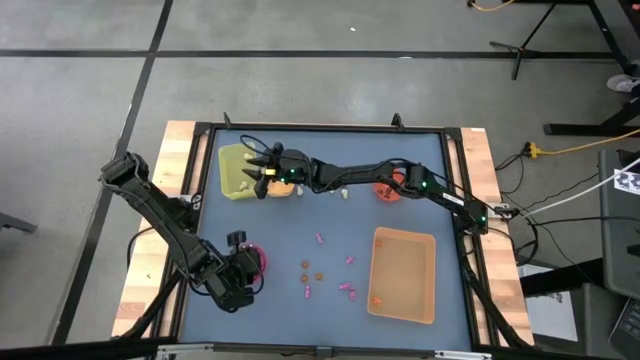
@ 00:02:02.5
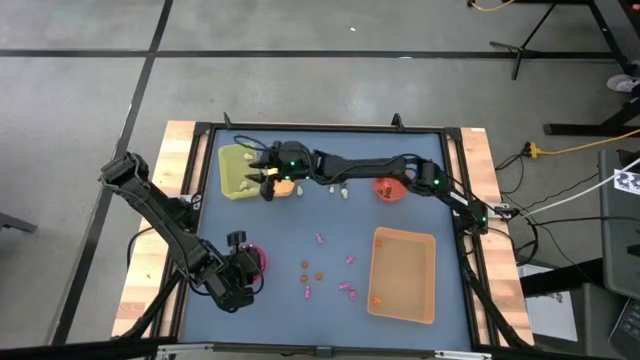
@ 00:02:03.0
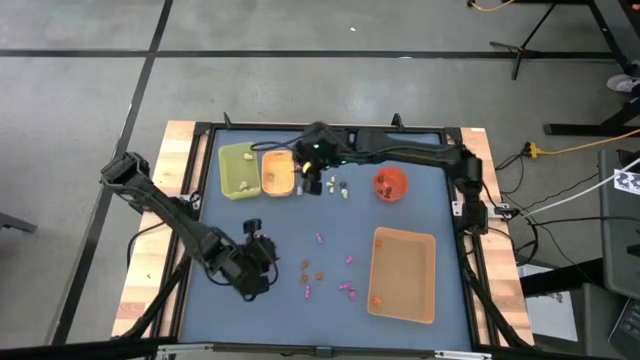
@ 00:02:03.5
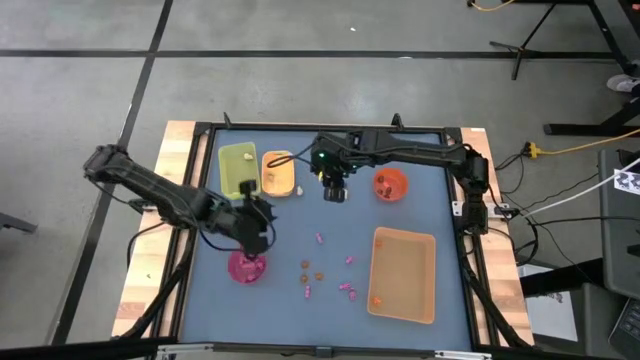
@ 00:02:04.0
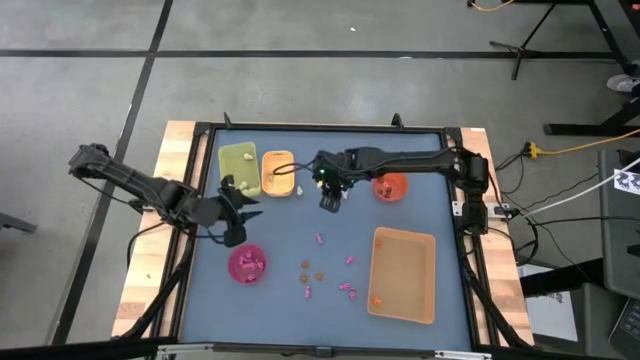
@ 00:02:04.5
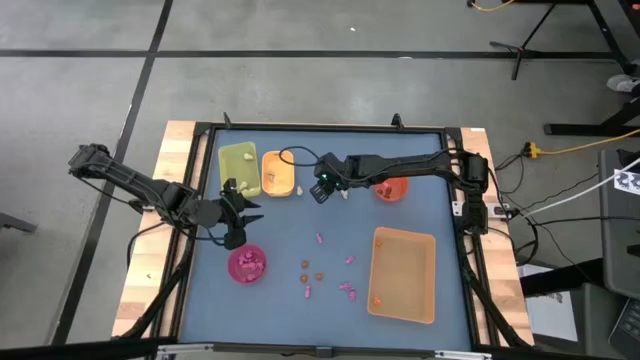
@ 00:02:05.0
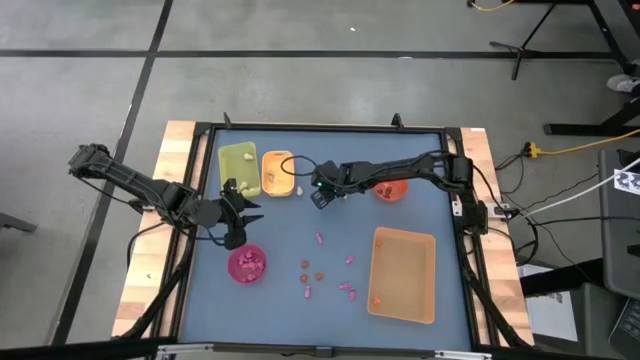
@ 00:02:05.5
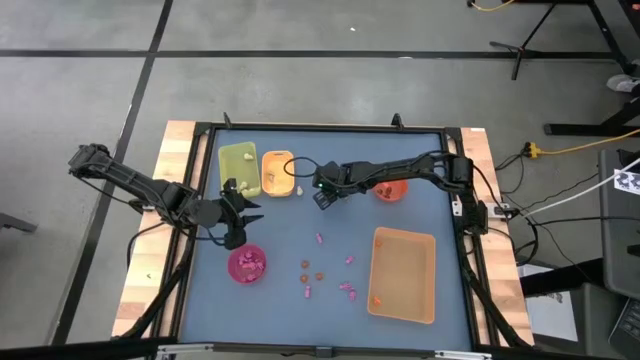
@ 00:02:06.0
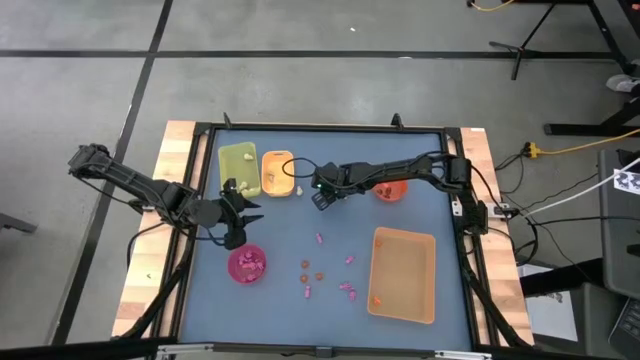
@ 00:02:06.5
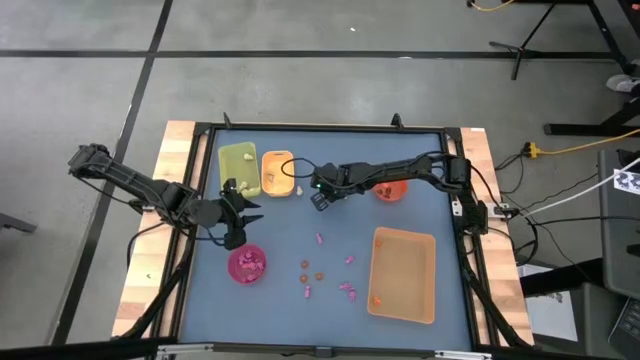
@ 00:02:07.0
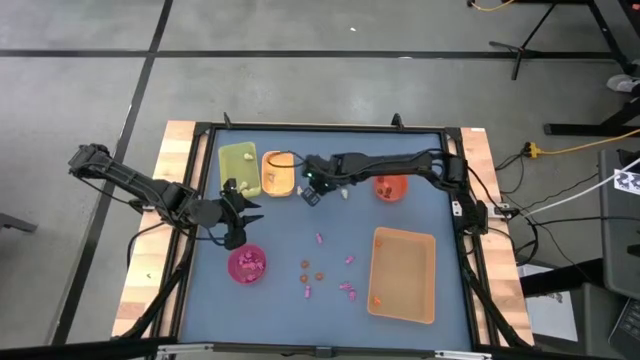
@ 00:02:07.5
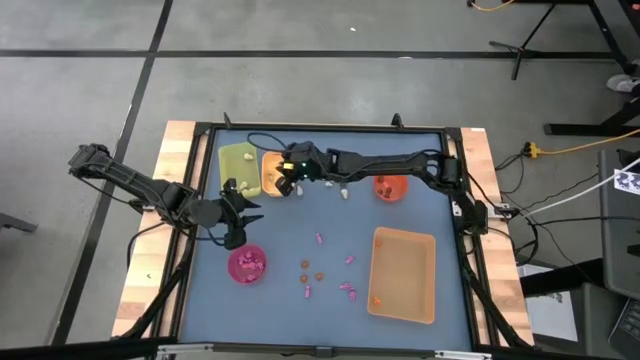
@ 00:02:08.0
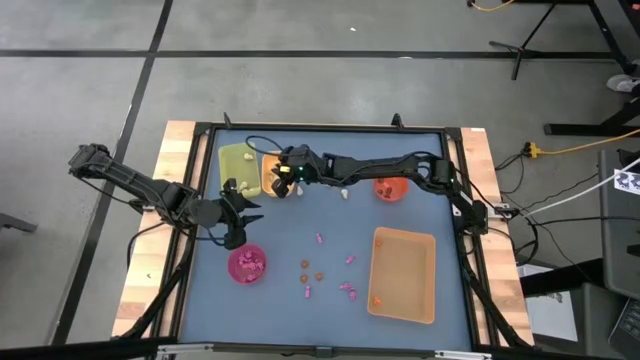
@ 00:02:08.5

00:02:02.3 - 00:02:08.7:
Task: Sort Halloween decoration
Put the small white skull toy into the yellow bin

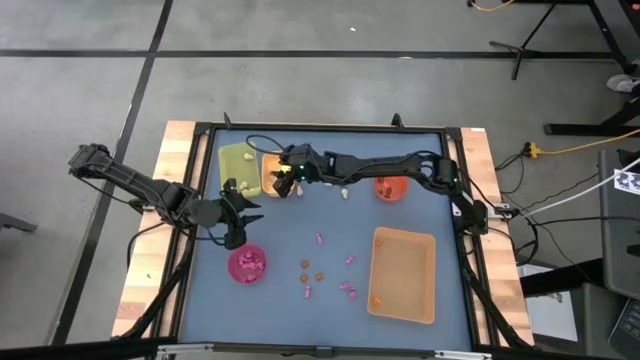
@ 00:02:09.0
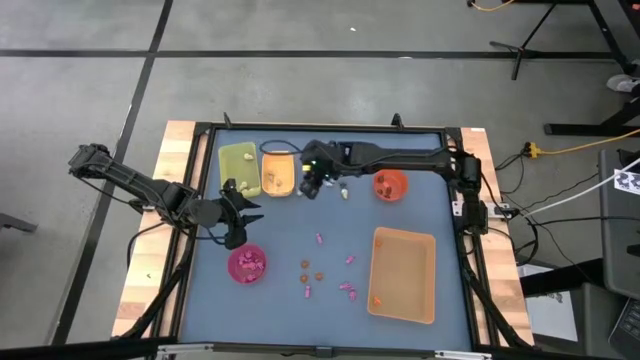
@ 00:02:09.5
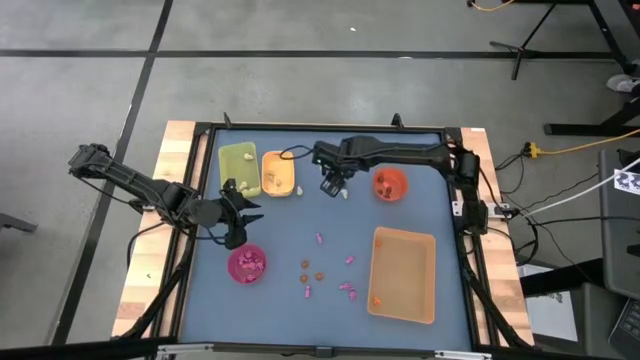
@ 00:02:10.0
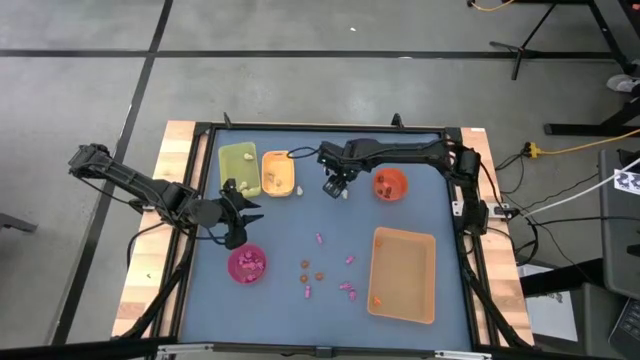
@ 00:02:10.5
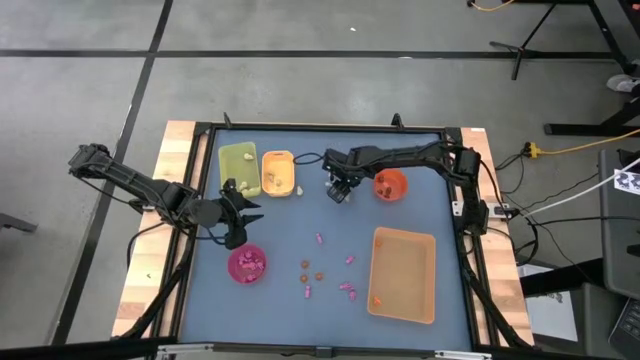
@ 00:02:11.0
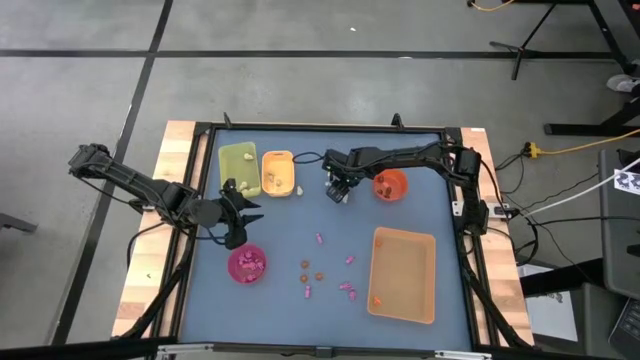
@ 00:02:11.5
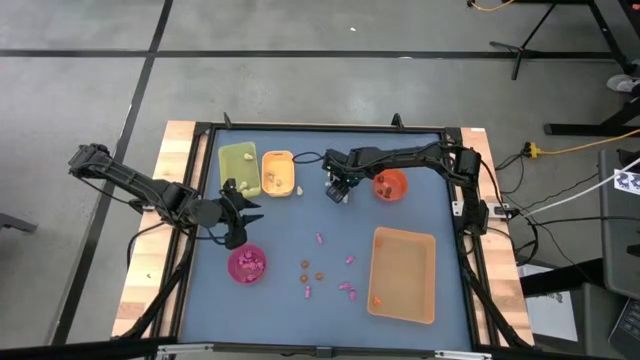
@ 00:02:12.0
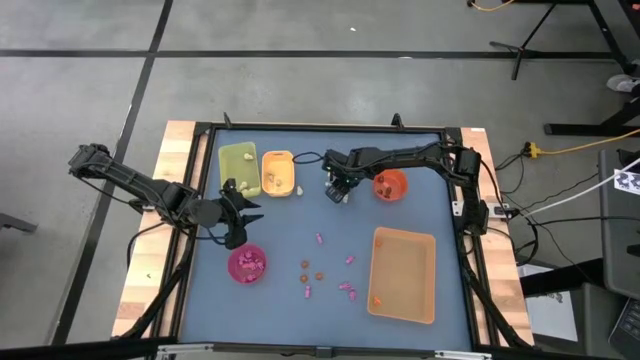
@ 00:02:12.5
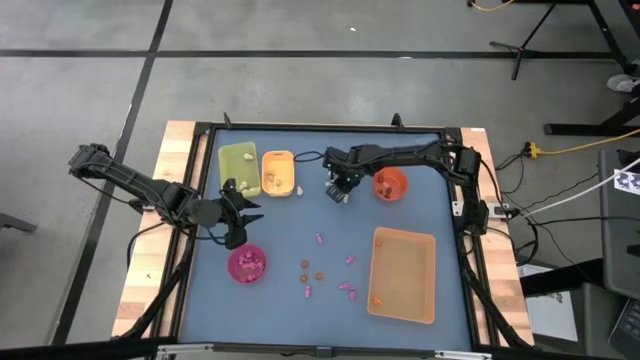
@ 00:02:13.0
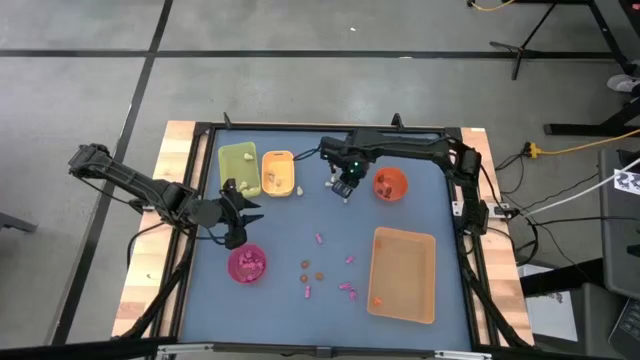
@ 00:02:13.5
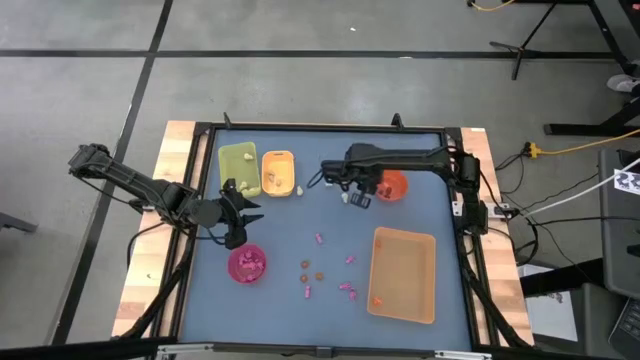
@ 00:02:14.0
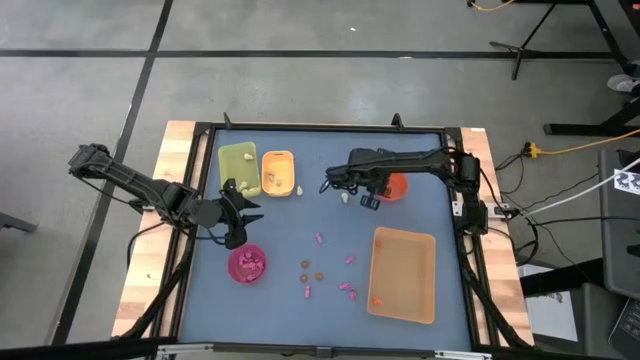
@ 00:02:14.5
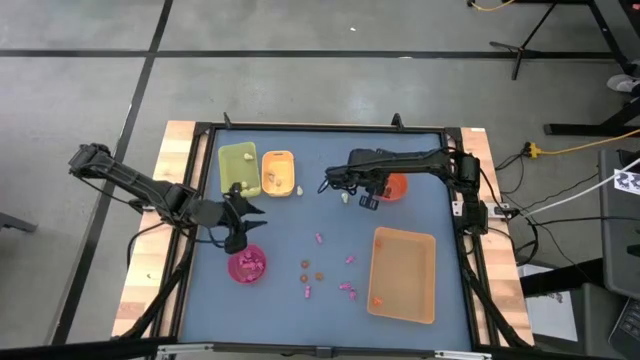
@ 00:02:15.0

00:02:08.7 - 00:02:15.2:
Put the black skull toy into the orange bowl

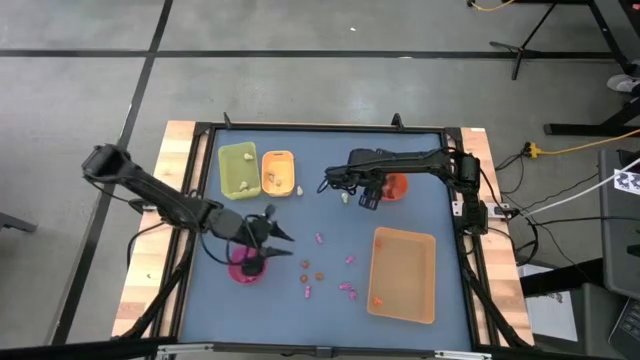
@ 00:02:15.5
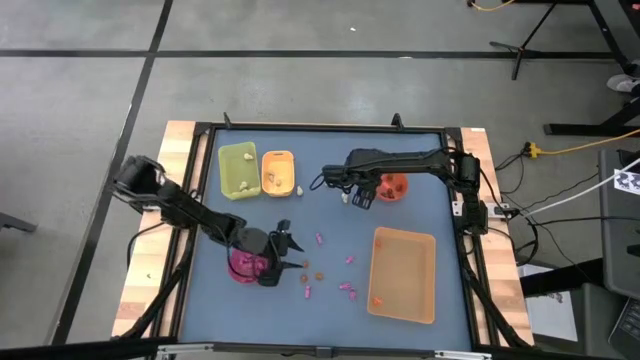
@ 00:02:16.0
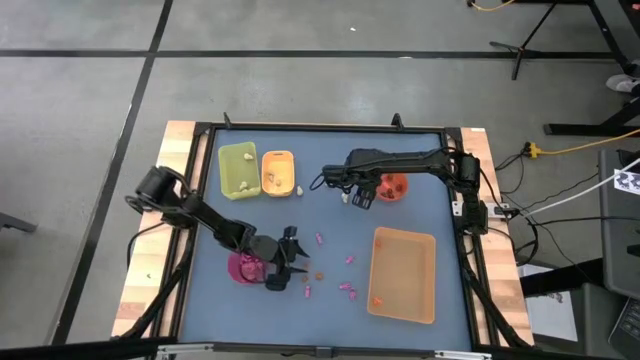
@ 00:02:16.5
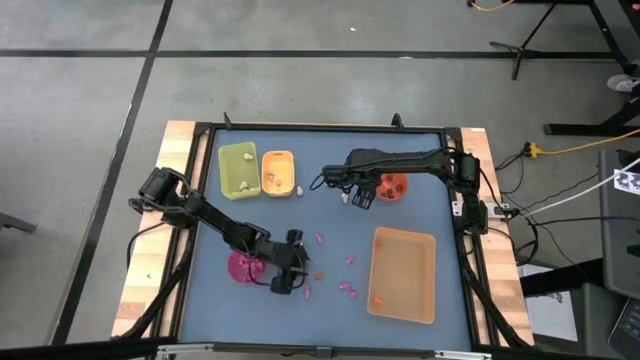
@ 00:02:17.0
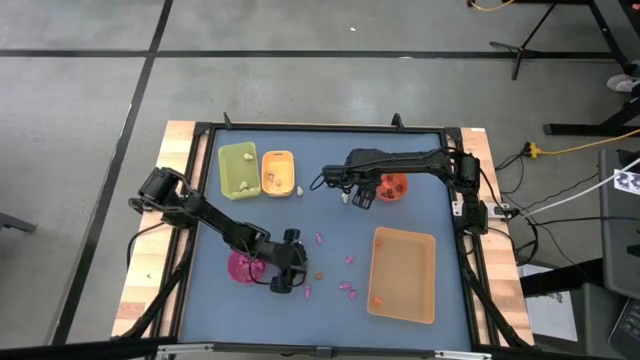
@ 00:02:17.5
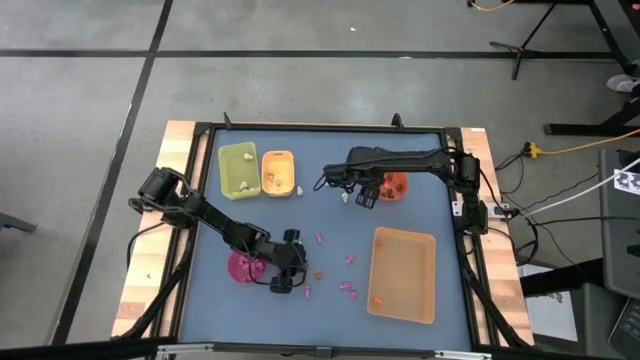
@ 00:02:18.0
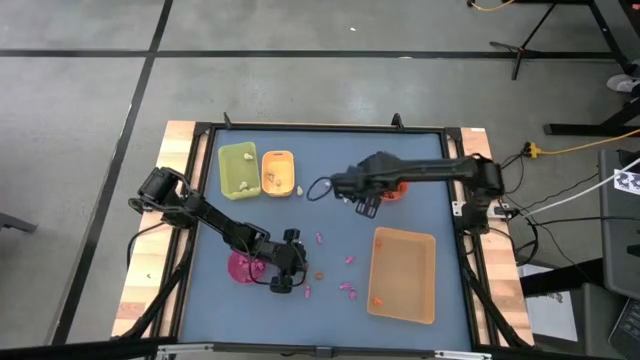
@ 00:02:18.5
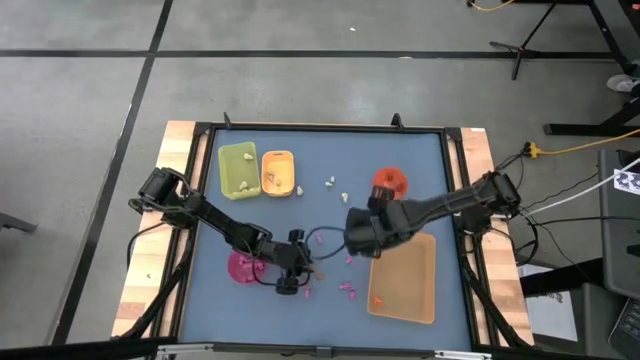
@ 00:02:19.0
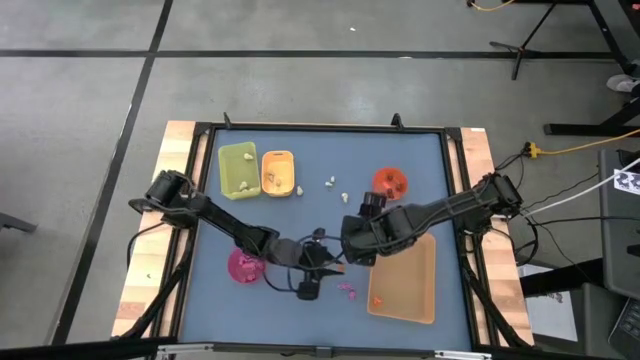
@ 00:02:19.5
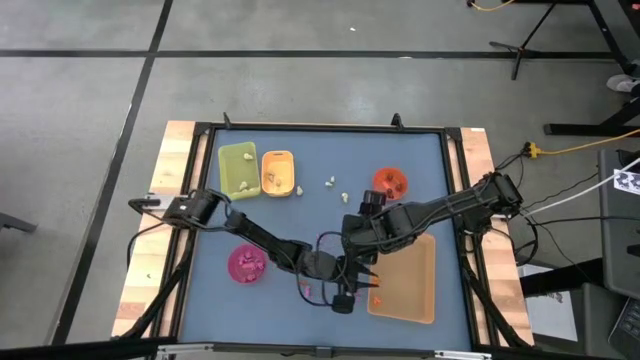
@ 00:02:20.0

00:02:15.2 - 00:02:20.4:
Put the orange pumpkin toy into the orange bin

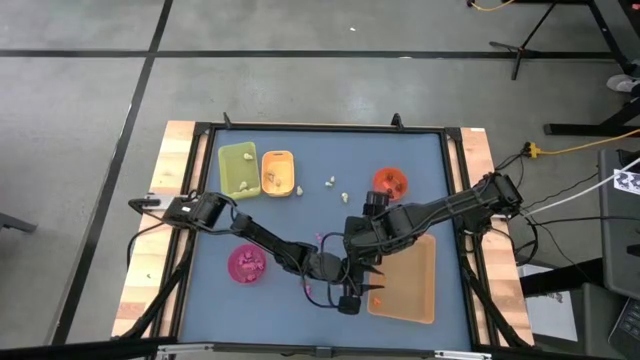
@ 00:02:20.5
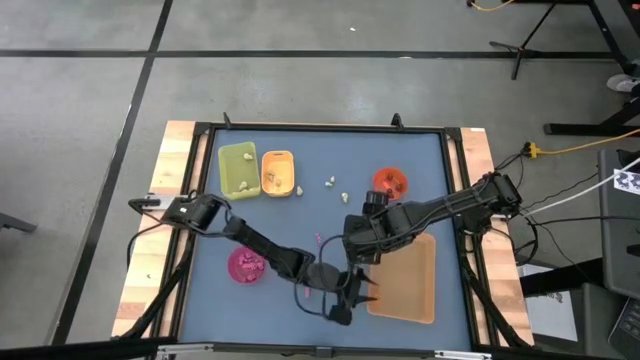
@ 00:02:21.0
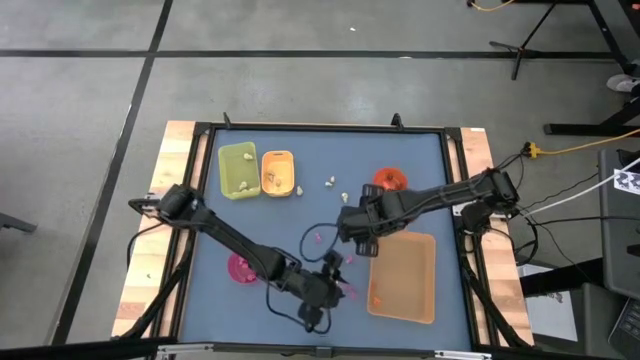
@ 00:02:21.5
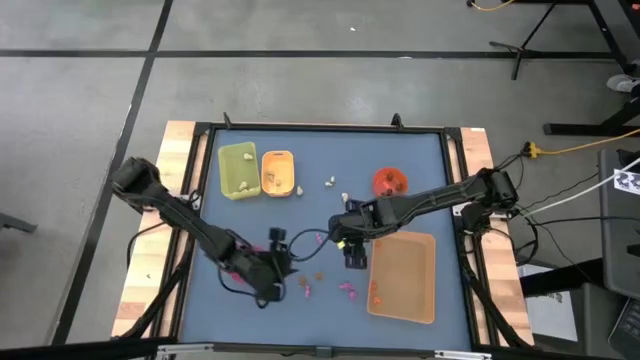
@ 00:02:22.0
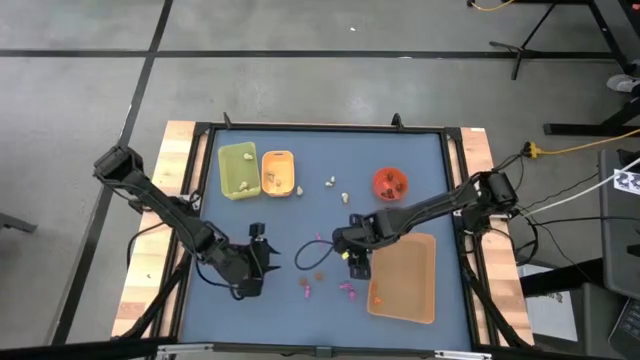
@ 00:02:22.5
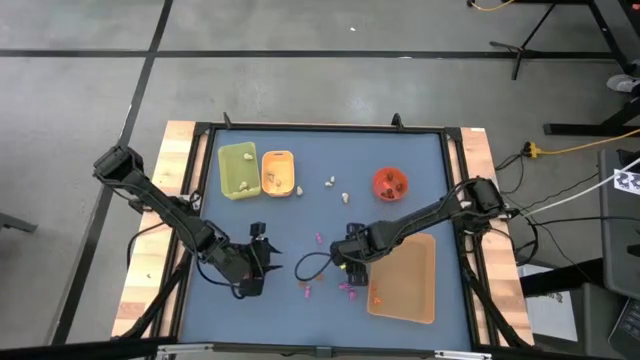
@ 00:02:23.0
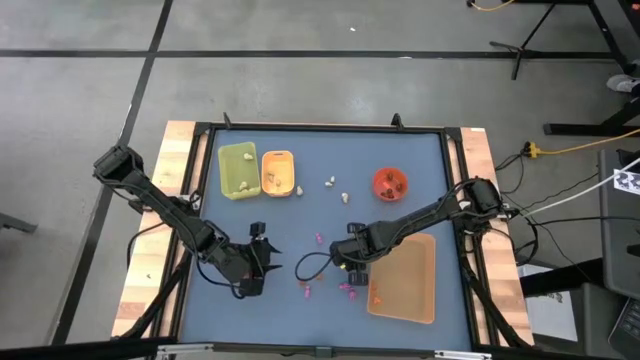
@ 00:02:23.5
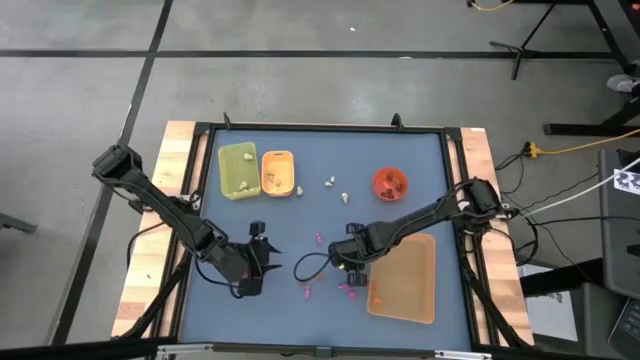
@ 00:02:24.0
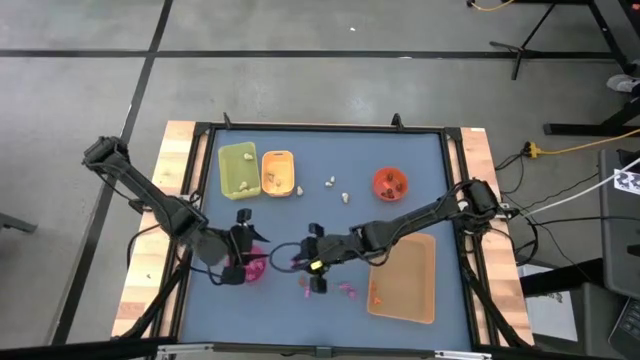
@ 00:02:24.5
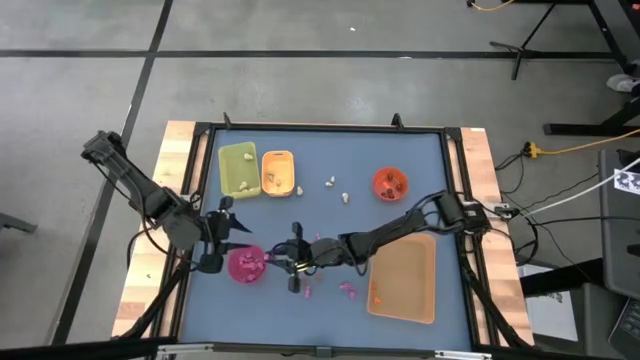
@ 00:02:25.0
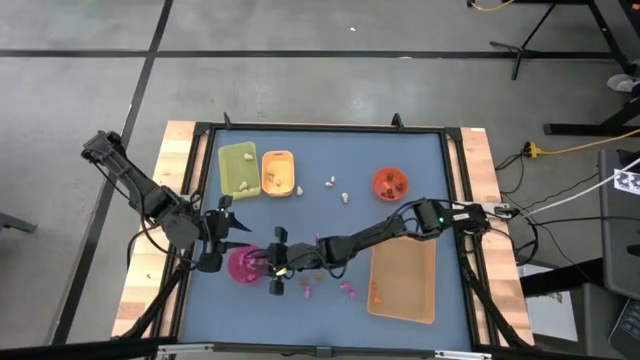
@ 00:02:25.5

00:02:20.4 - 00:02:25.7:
Put the pink skeleton toy into the red bowl
